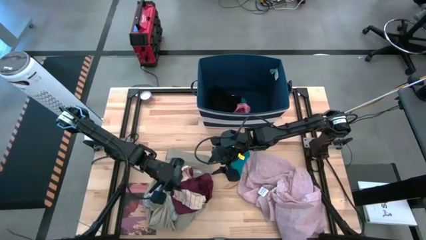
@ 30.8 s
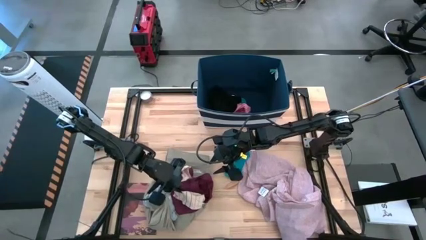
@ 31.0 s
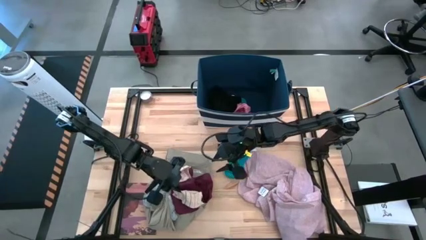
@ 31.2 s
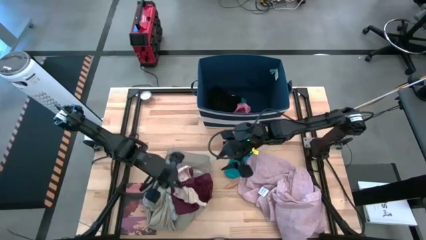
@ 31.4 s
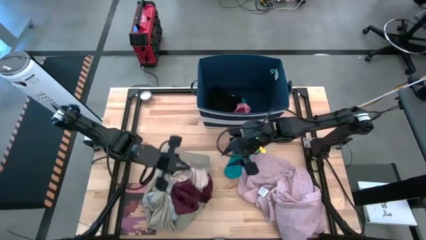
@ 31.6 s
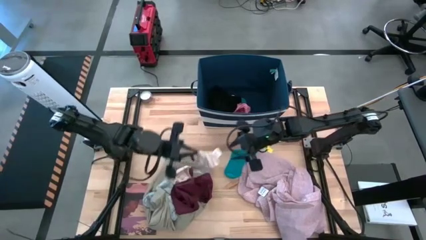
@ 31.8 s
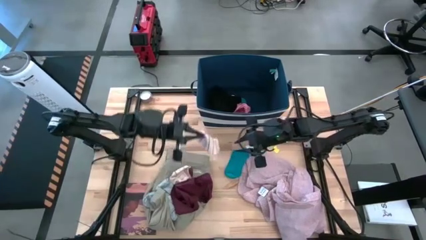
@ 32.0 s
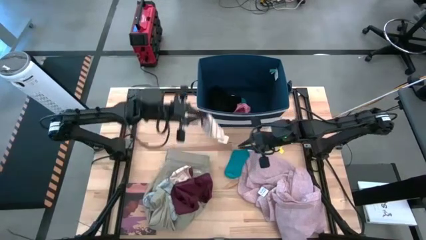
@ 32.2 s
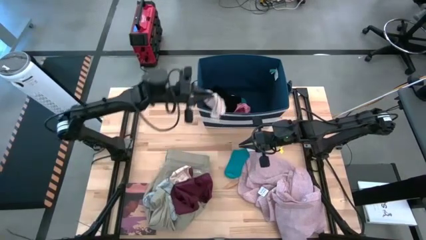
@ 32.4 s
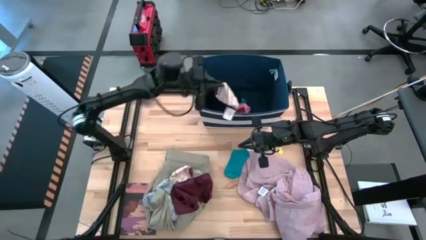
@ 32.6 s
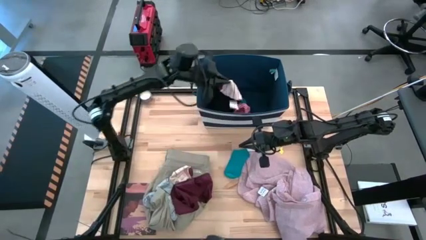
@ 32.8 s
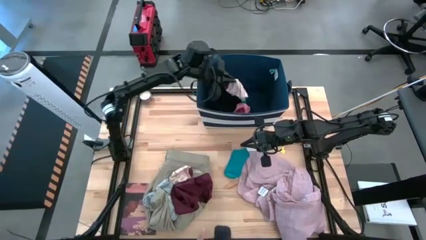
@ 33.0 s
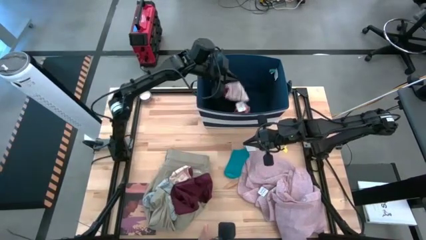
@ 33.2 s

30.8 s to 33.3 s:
Task: Sort clothes
Put the bottom white patterned sock into the laundry bin

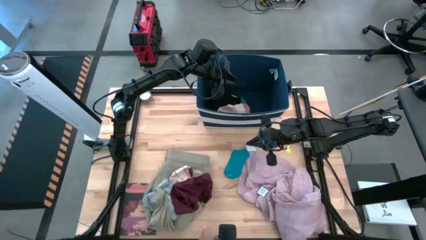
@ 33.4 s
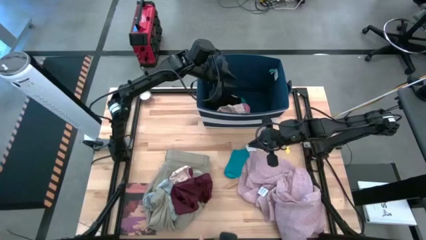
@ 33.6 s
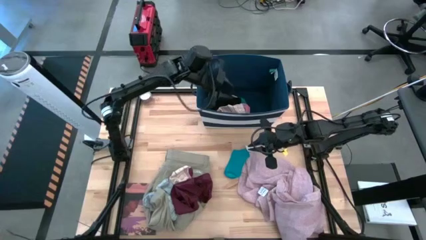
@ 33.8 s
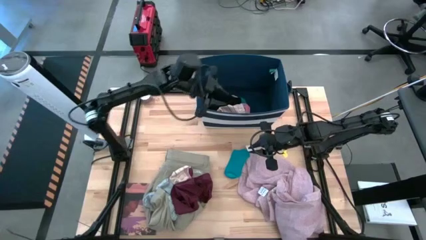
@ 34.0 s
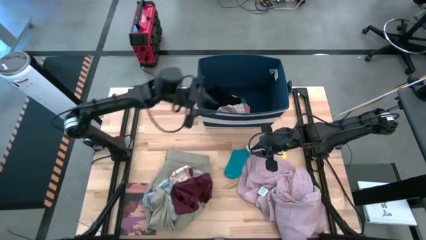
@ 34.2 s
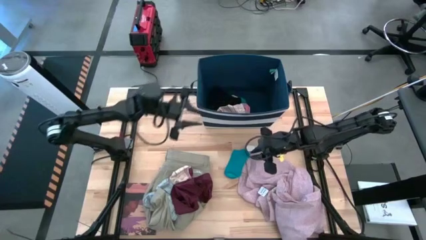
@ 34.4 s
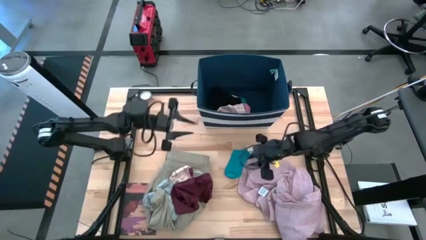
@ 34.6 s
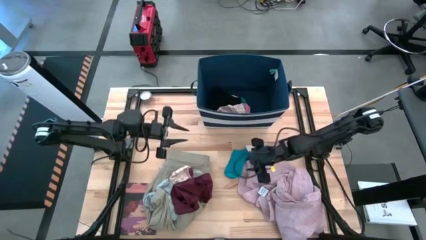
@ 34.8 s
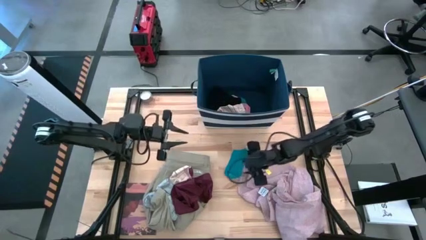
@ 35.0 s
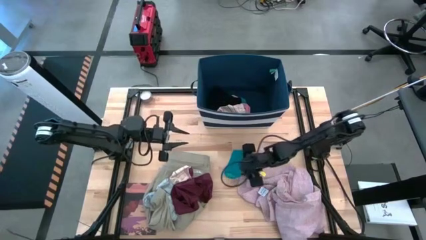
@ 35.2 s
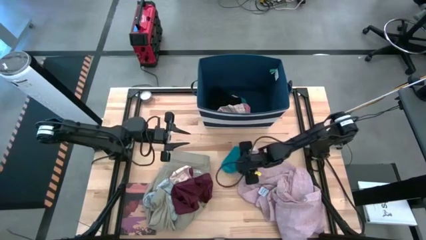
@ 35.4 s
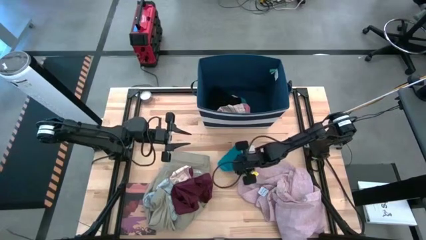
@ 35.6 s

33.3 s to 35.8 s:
Put the blue sock into the laundry bin

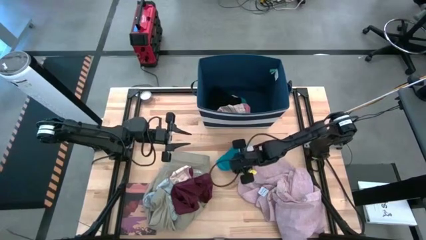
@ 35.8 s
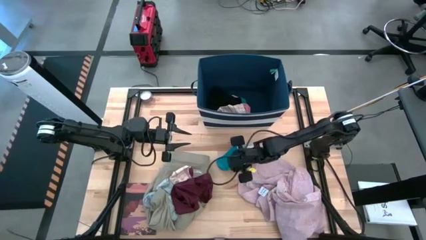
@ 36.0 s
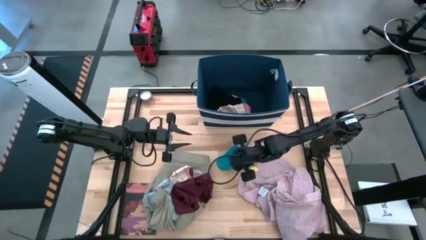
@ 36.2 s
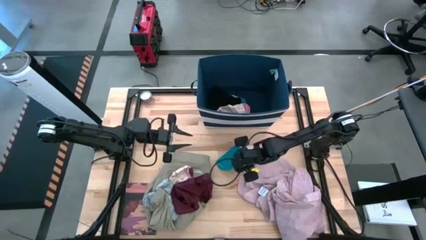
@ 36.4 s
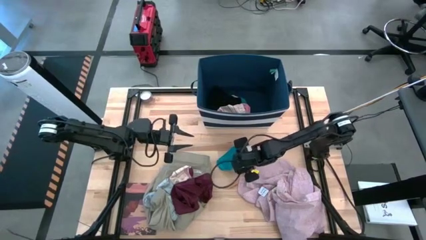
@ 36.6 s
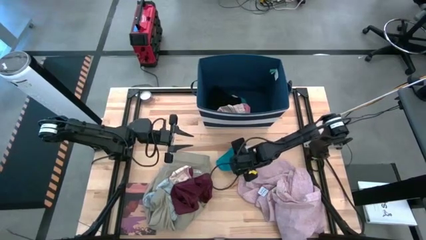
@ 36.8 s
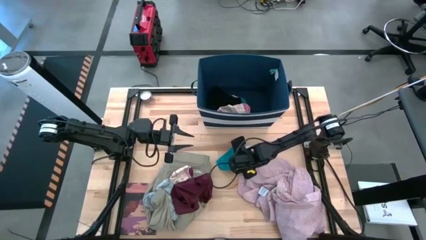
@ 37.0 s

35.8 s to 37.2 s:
Put the blue sock into the laundry bin

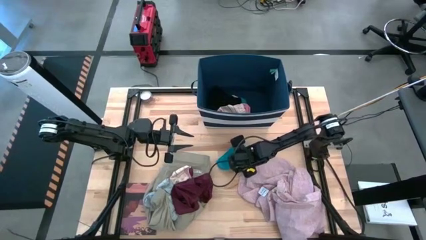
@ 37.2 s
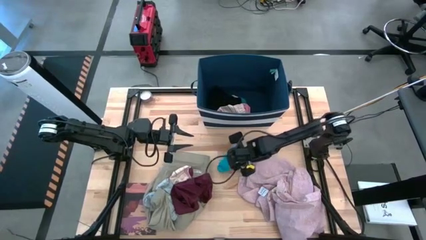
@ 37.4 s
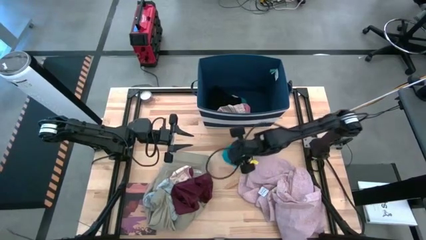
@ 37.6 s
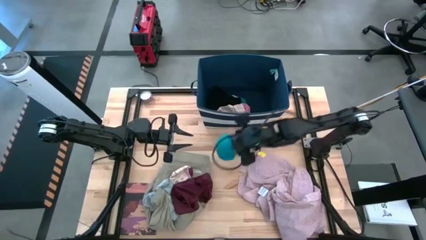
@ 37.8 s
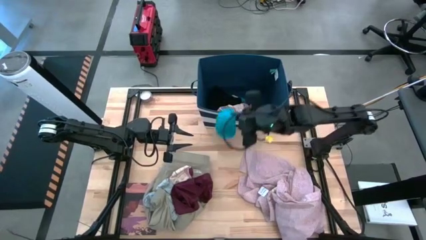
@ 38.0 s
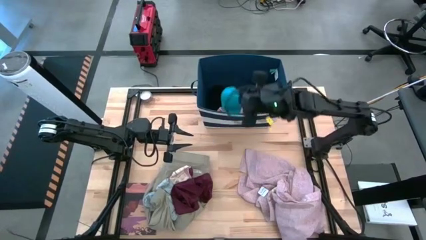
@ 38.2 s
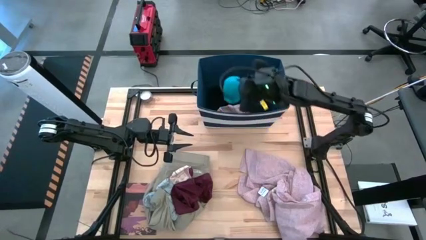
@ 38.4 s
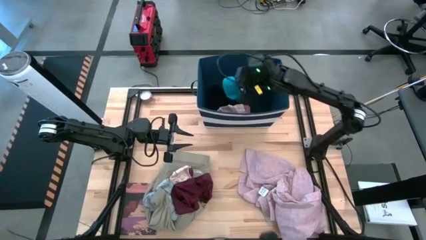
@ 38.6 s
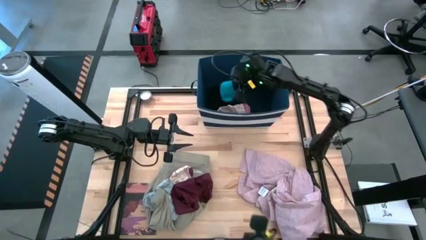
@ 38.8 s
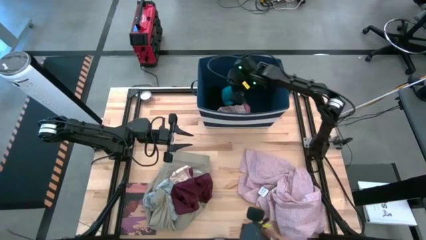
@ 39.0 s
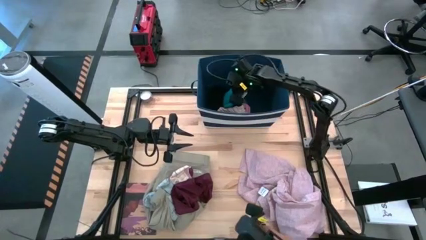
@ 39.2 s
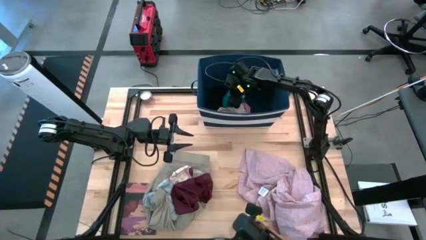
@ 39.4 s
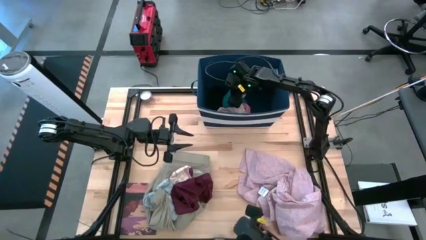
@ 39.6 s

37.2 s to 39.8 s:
Put the blue sock into the laundry bin

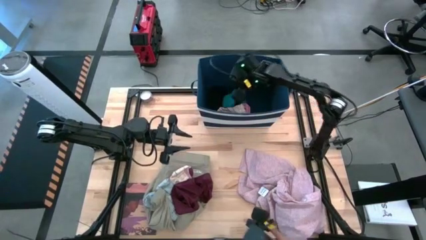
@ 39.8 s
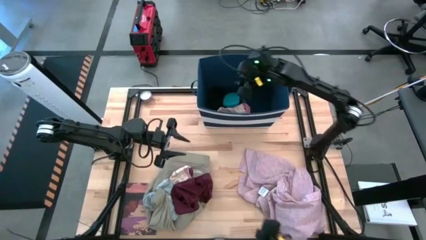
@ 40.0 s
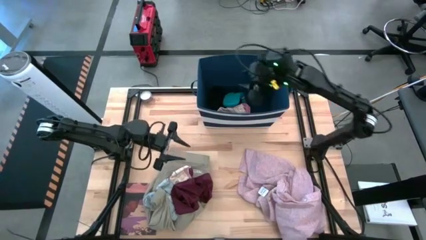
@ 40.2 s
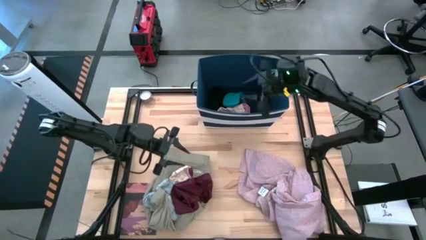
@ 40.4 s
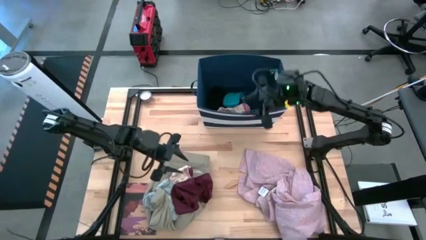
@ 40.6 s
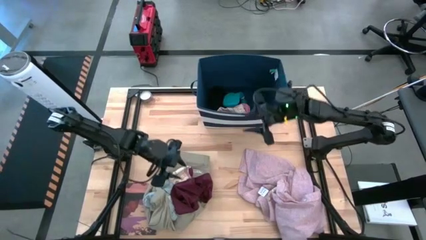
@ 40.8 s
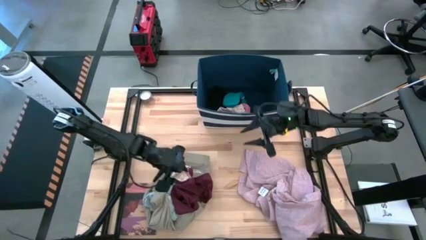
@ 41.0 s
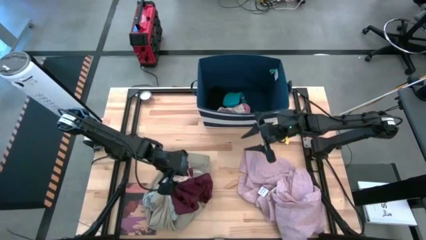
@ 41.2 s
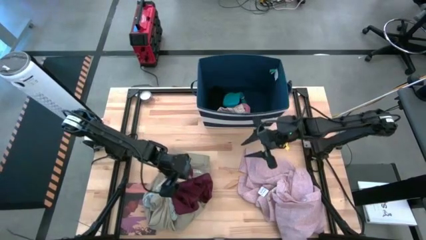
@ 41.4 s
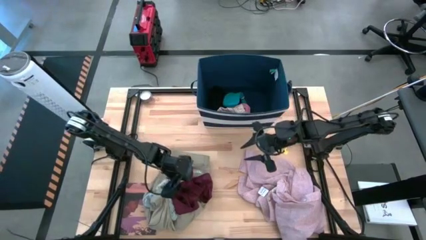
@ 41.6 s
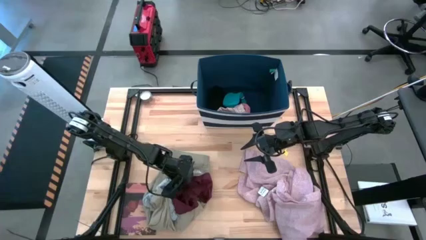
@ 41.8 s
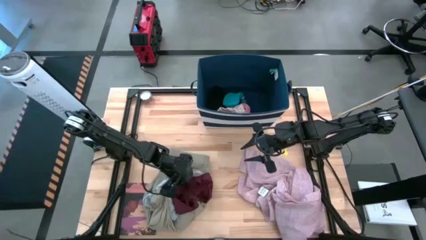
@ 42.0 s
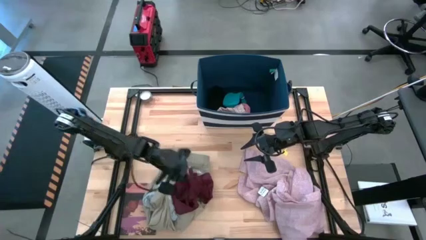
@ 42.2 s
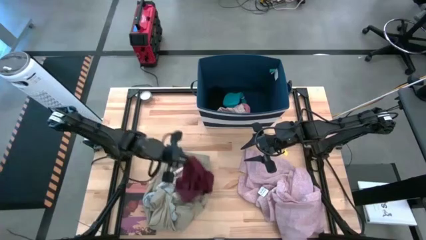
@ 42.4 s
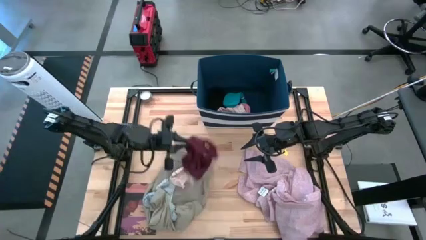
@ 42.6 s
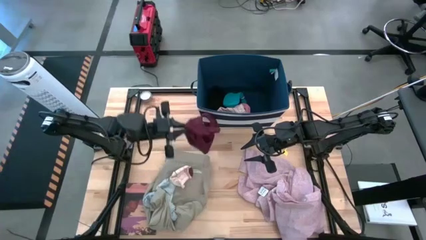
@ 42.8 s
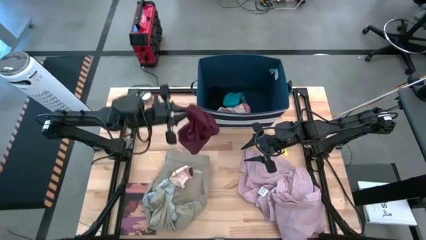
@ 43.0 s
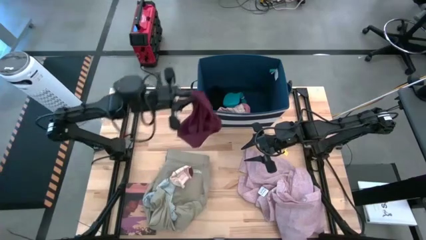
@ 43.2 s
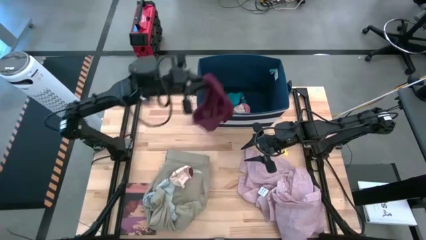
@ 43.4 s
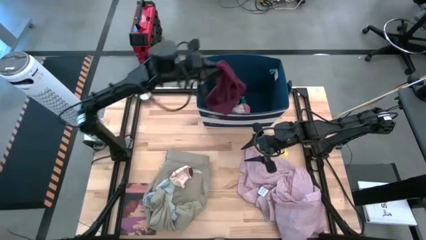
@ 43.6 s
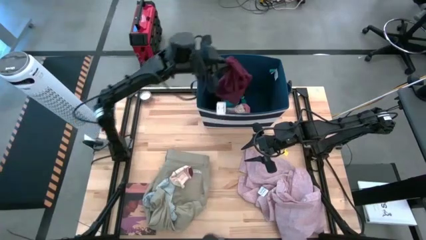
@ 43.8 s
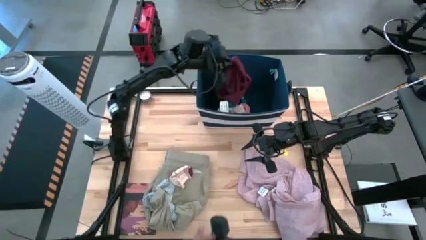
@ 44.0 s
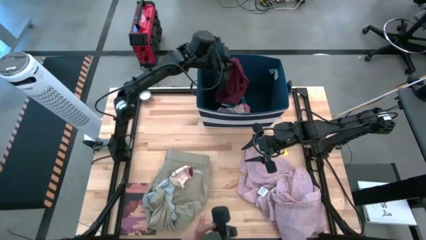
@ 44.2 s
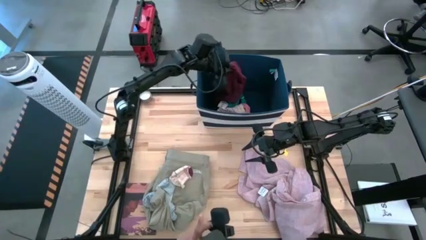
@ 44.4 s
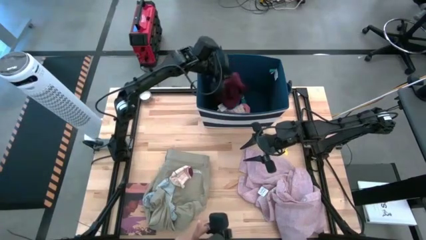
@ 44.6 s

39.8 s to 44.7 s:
Put the red underwear into the laundry bin

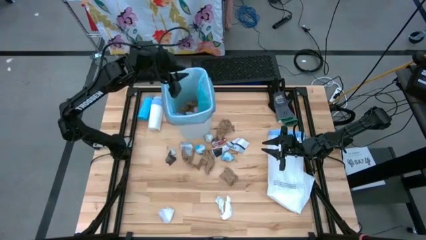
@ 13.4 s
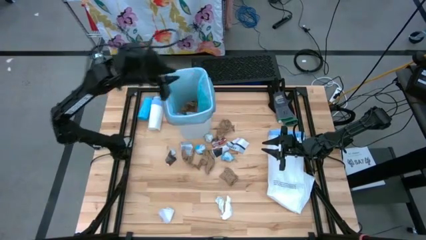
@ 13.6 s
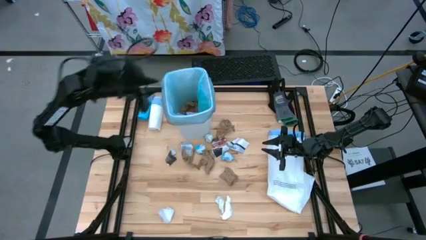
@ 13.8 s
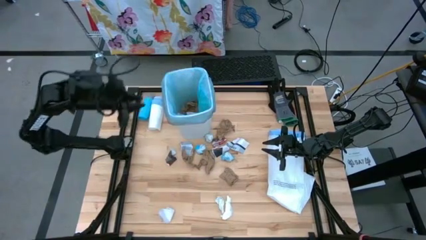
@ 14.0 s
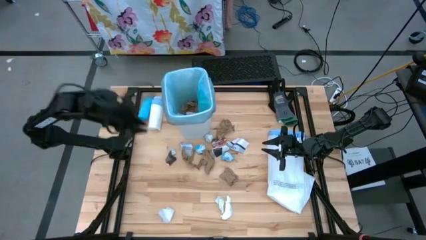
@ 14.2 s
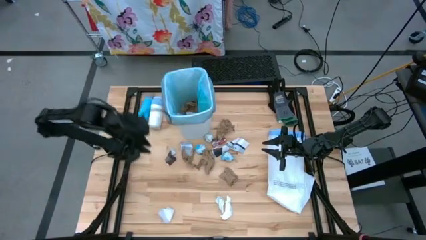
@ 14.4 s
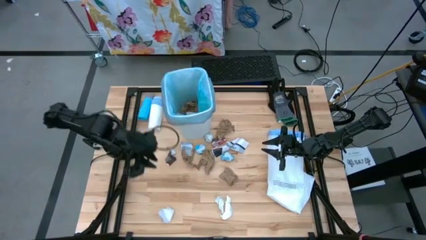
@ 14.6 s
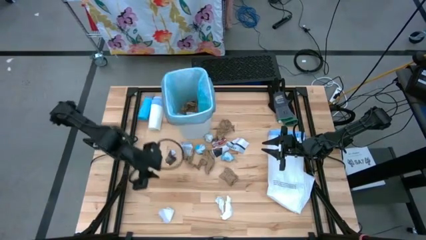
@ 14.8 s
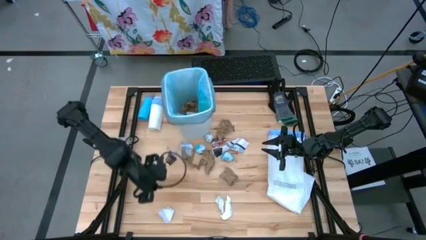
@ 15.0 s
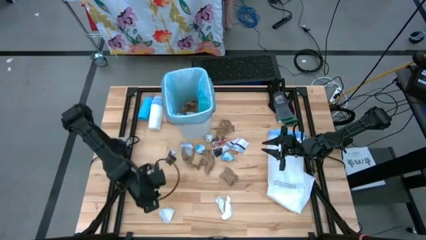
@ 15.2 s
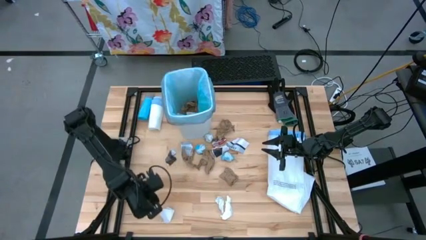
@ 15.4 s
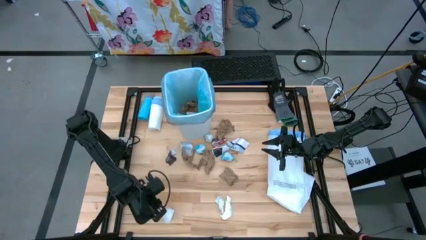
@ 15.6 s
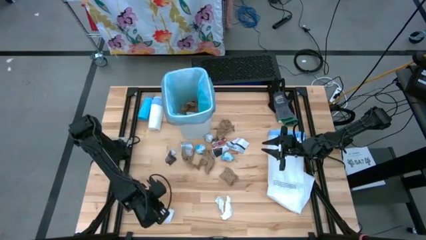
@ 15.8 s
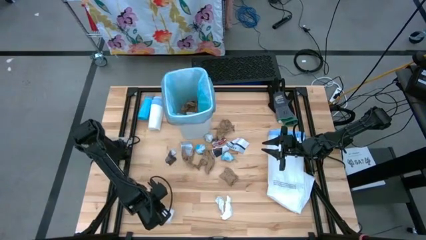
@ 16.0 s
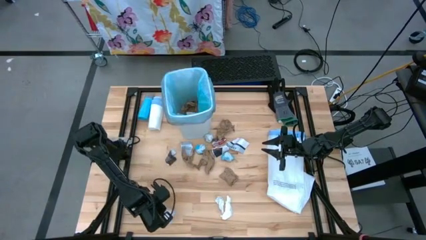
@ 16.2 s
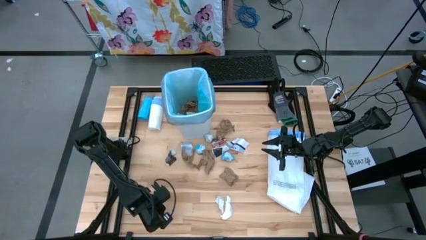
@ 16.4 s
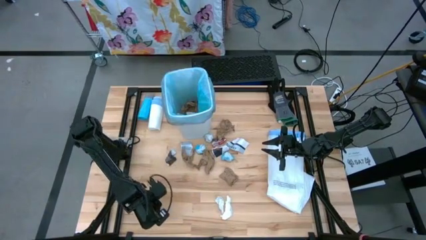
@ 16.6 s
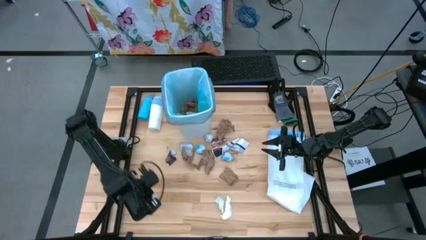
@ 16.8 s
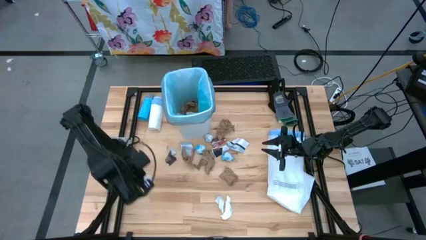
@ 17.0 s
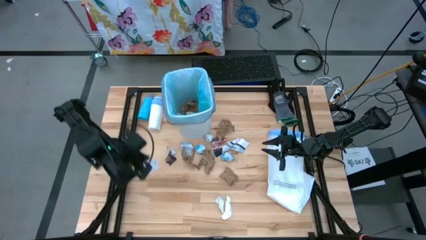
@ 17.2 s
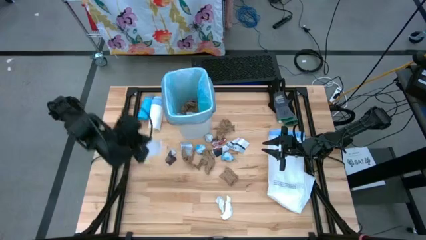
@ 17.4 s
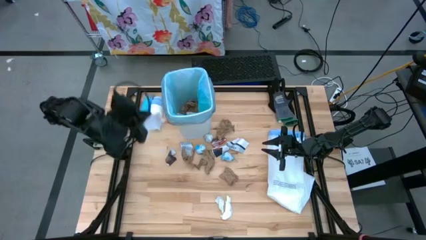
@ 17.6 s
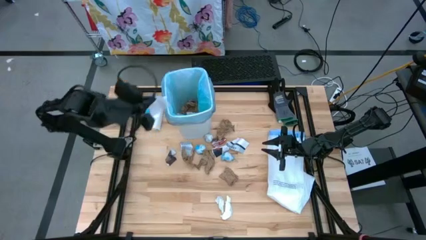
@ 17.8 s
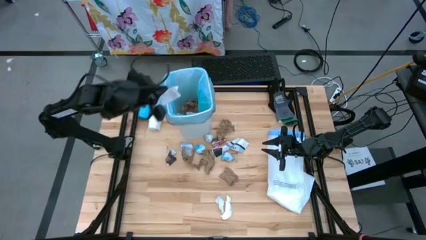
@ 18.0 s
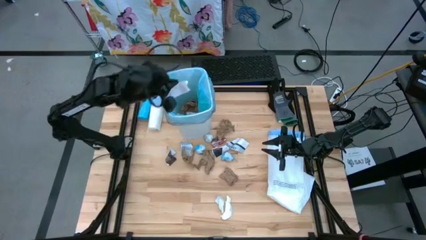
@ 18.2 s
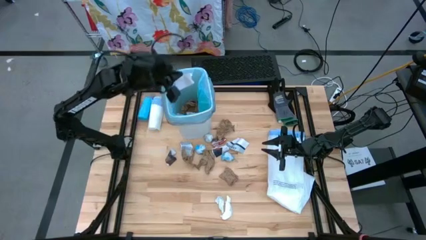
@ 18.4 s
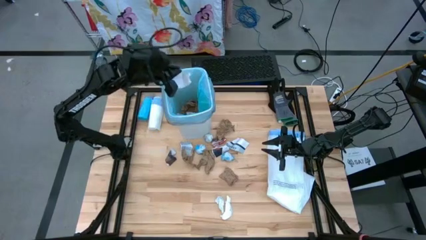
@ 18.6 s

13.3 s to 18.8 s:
Task: place trash/remove bag and relplace
Put the white paper into the white trash bin
